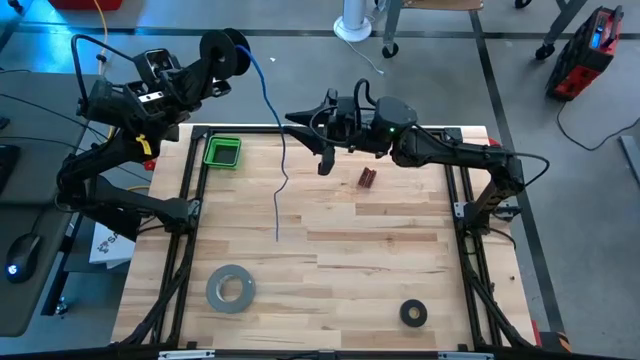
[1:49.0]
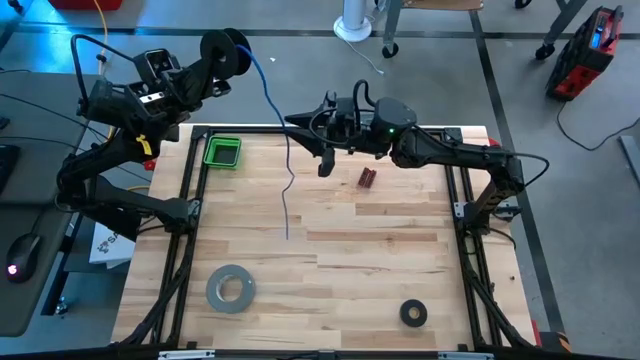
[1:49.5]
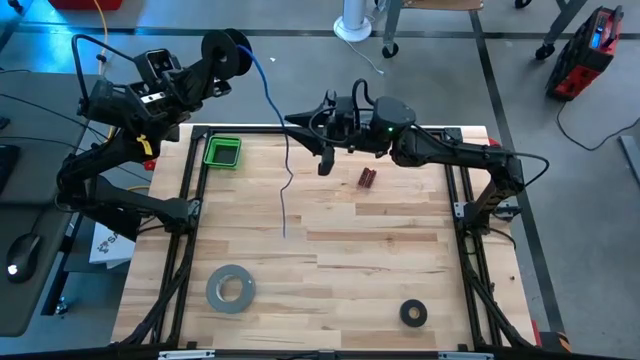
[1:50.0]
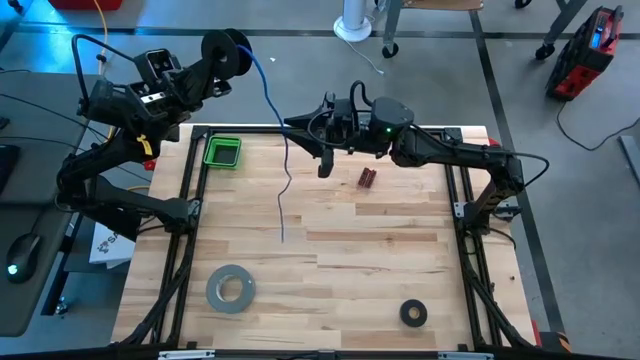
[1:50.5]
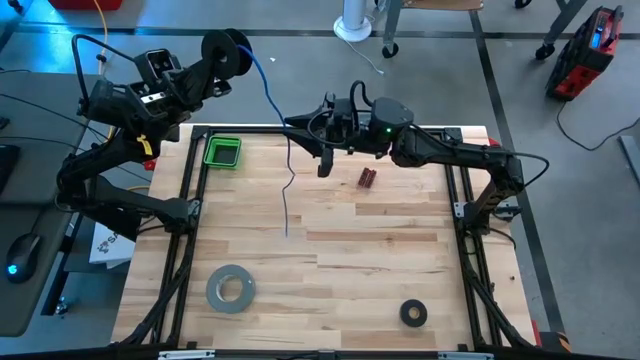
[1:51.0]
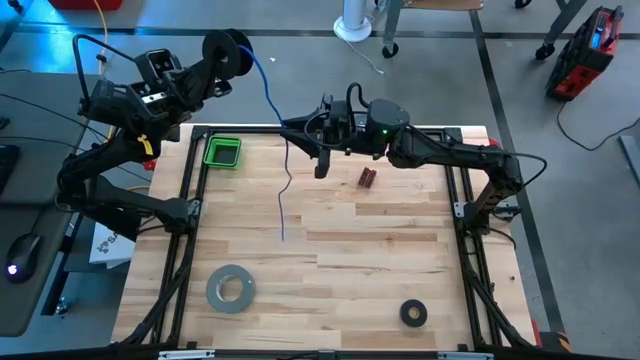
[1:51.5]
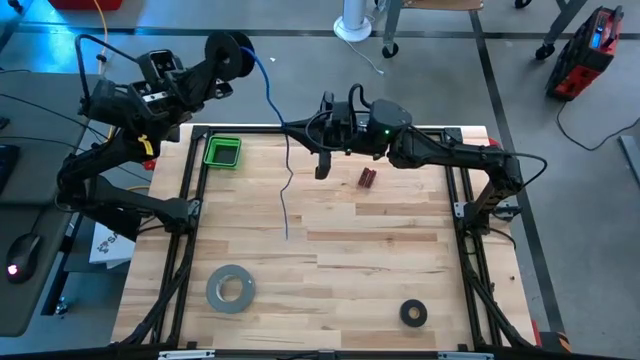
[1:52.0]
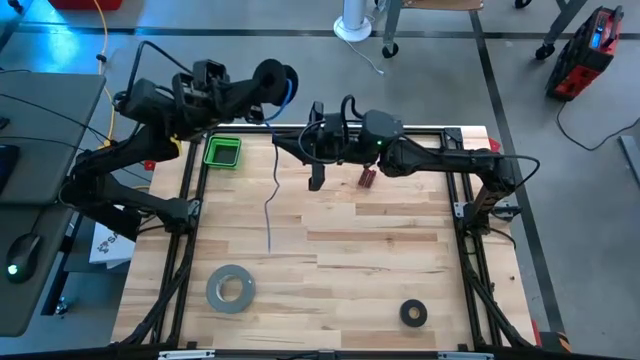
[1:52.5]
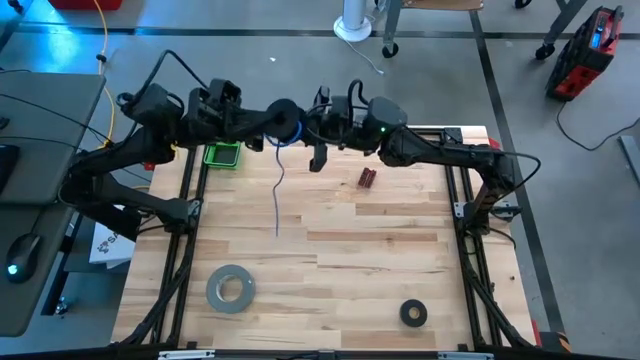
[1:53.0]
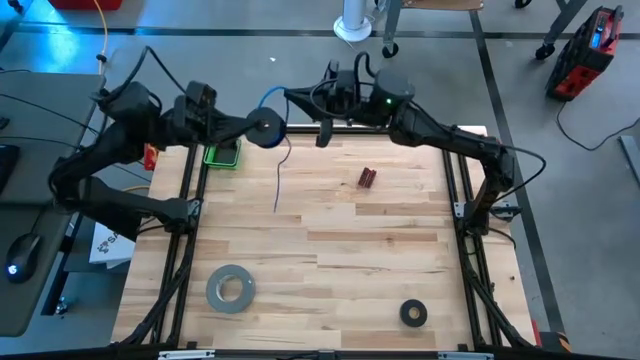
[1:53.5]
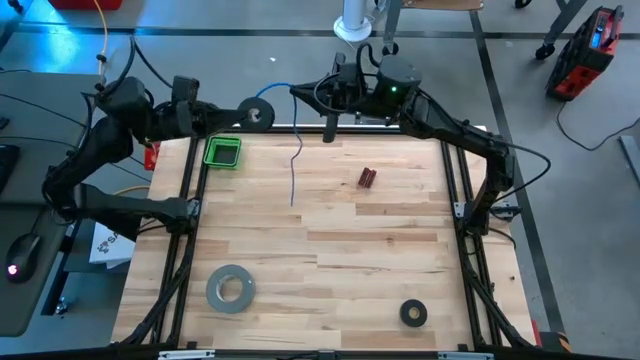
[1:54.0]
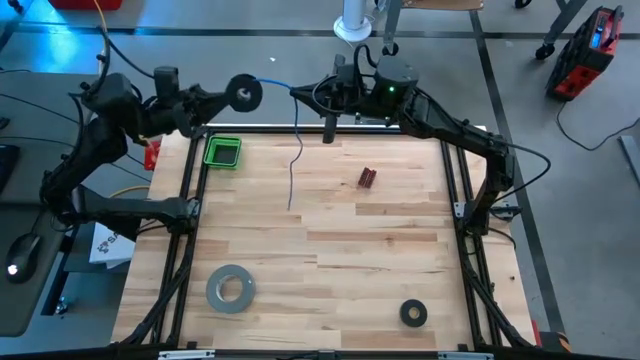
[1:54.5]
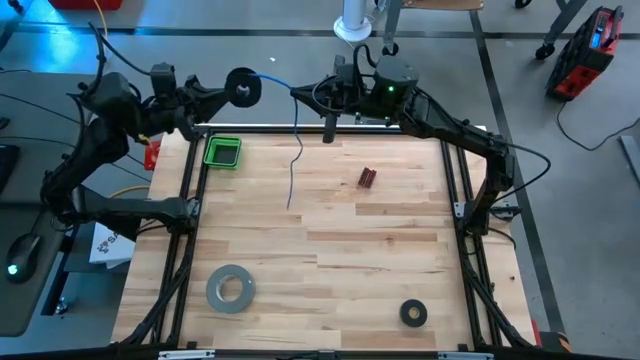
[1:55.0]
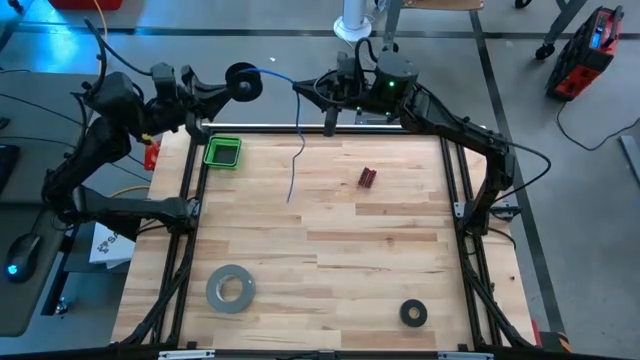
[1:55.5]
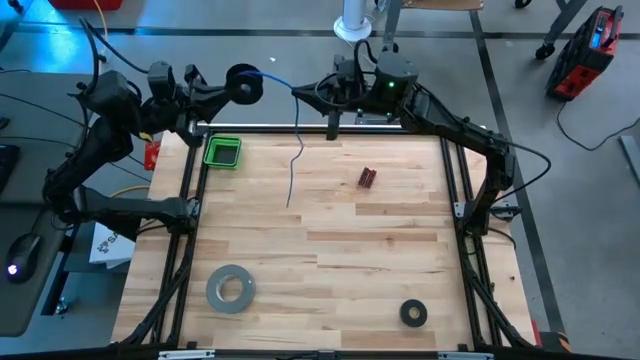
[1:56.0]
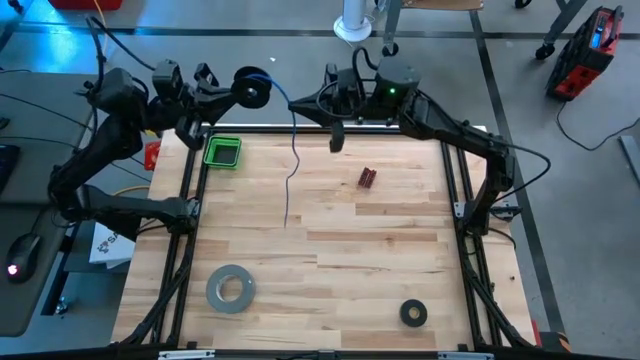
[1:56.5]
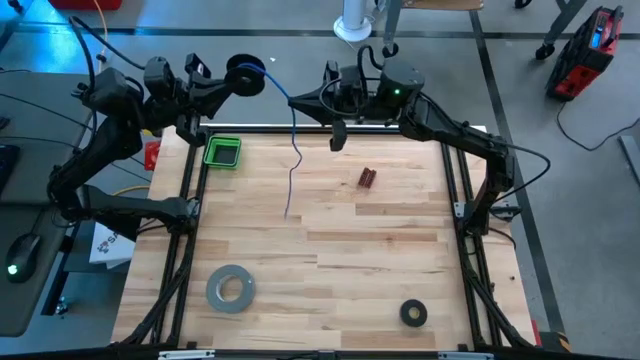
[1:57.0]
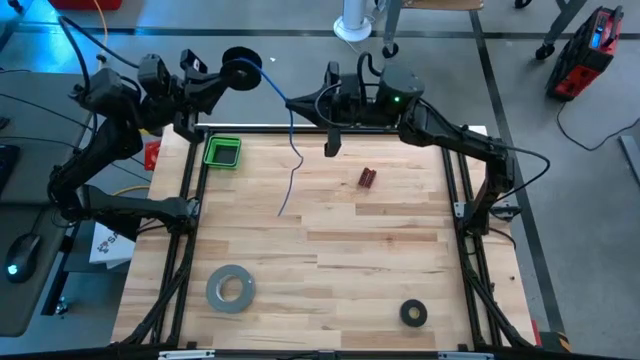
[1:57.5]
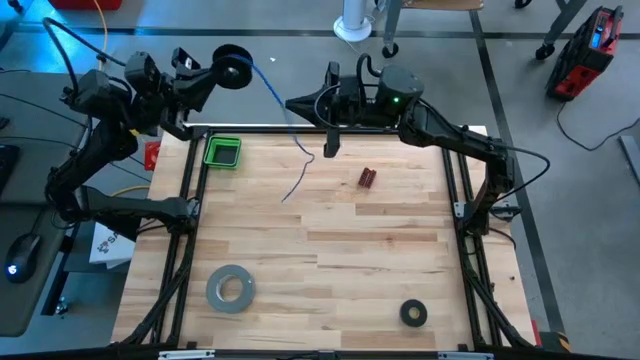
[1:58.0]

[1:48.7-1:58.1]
Task: Coil cords
Coil the blue wire onto the spool

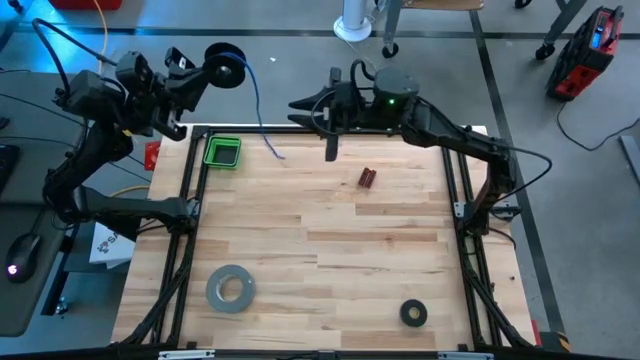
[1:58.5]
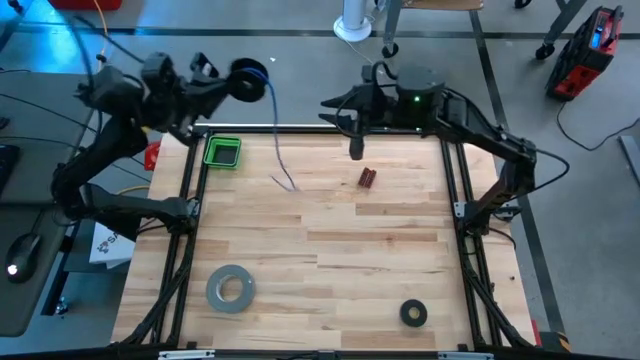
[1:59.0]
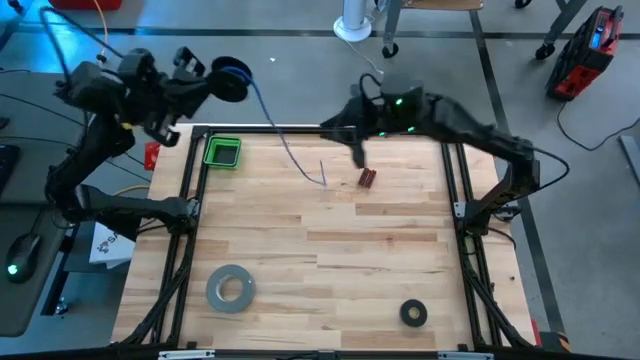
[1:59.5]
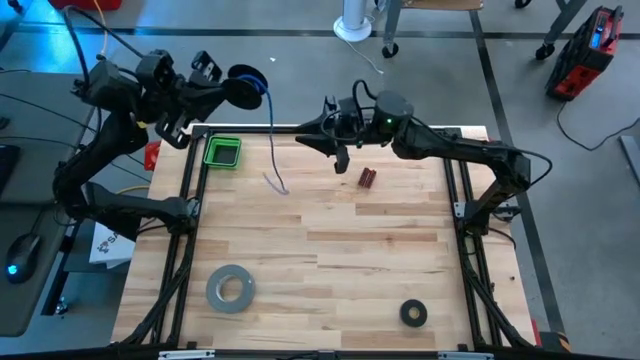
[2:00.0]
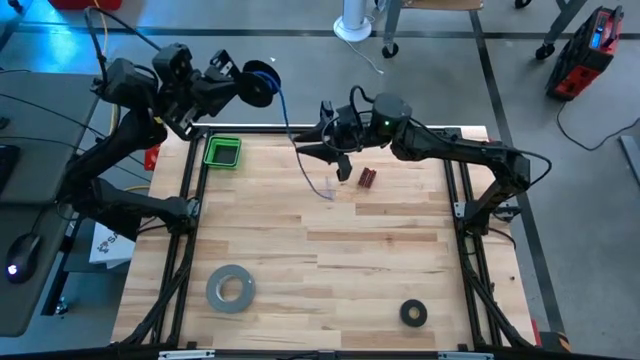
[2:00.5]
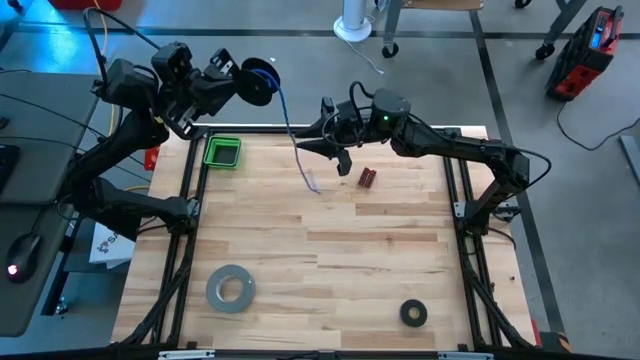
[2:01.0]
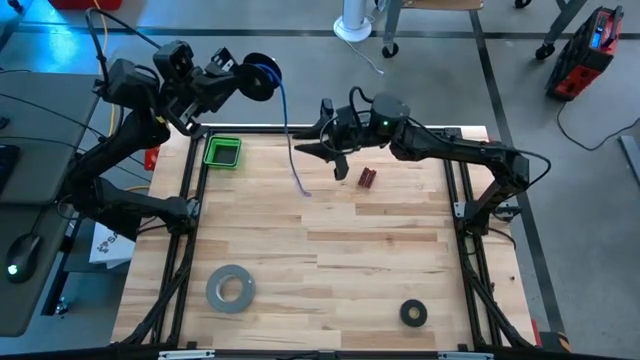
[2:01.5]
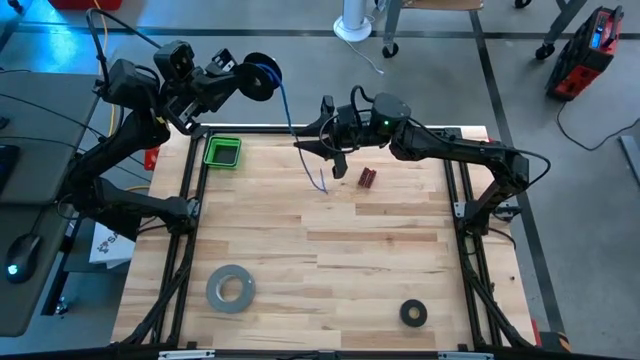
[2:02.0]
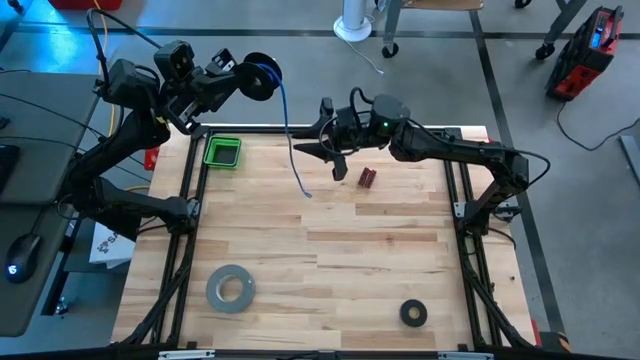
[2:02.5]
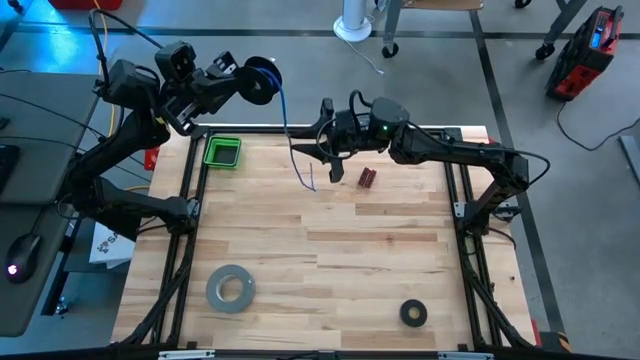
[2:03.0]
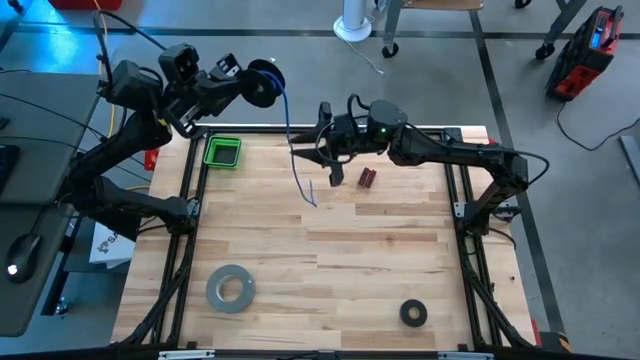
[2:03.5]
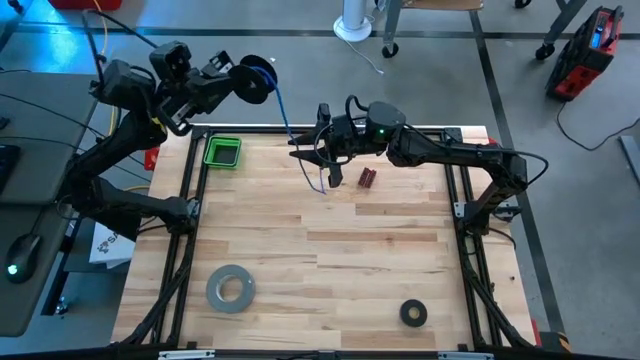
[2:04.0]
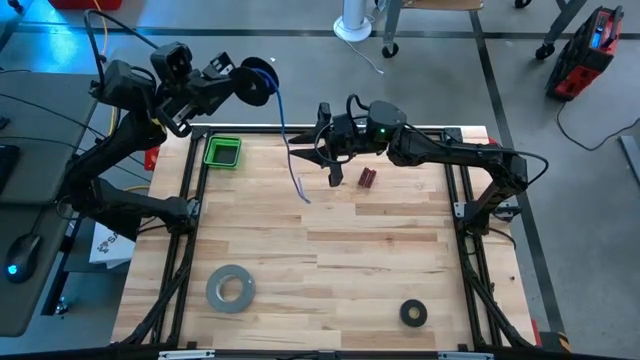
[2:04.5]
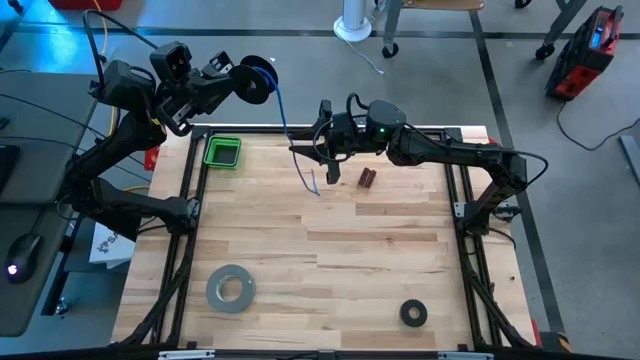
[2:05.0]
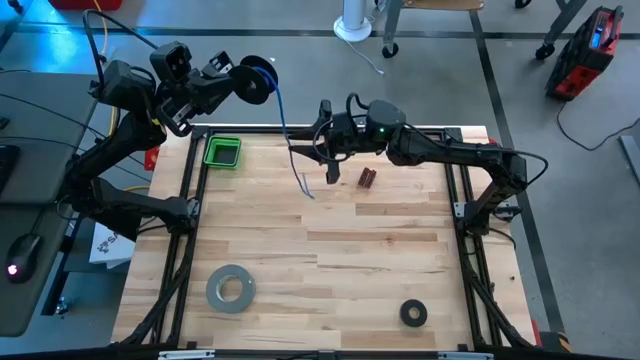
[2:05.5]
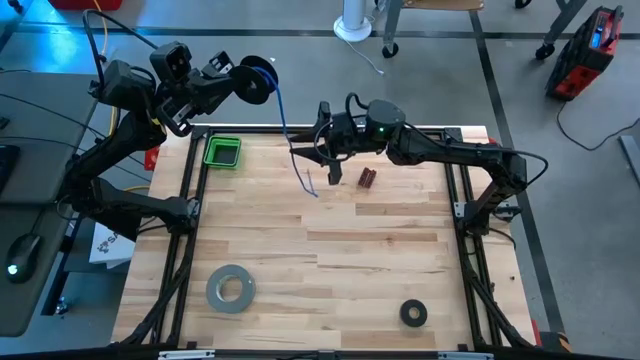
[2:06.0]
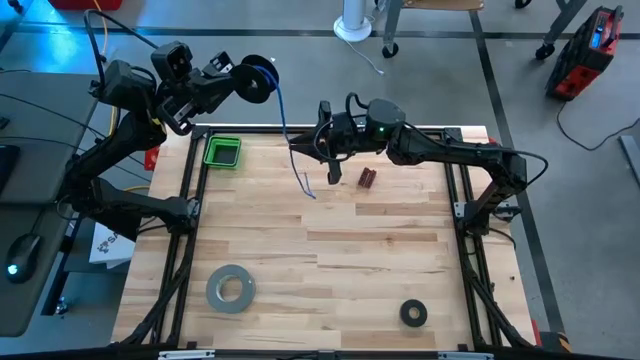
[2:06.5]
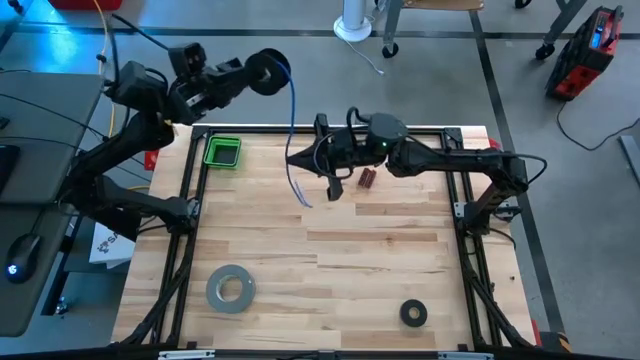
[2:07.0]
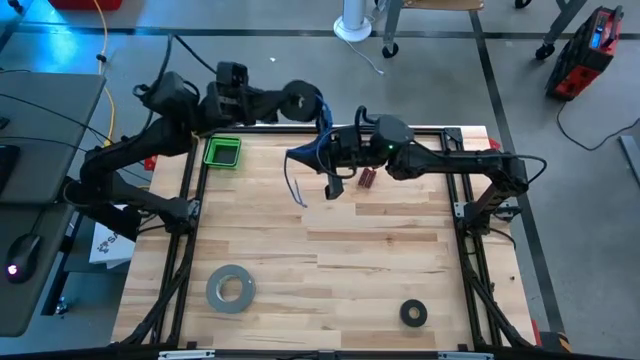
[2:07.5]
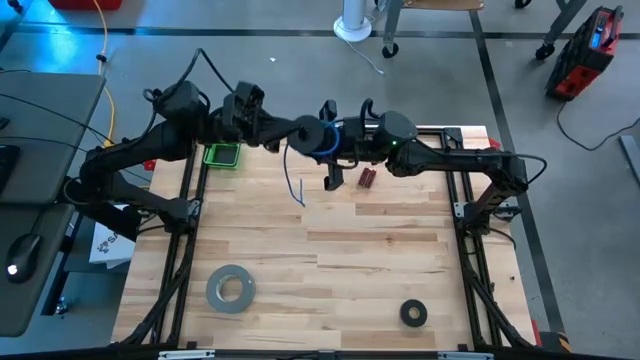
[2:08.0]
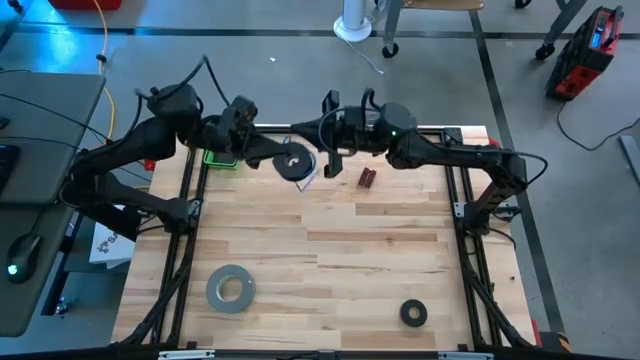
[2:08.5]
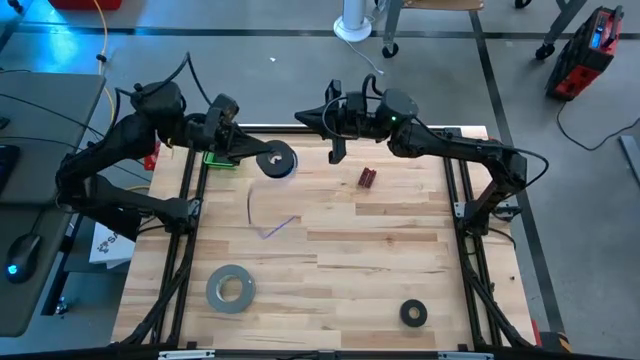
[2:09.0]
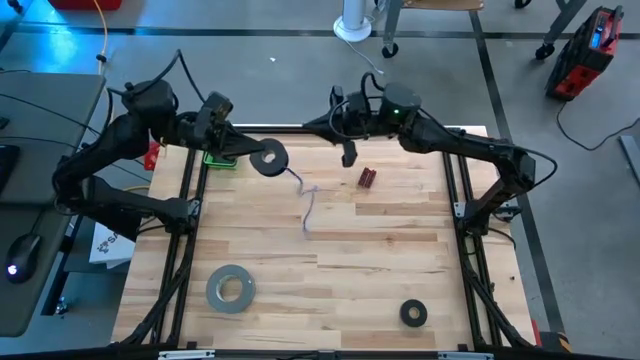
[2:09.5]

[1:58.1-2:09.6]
Coil the blue wire onto the spool
